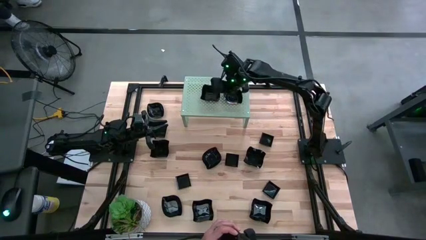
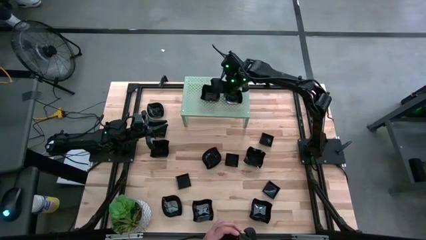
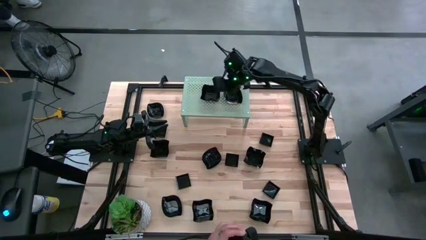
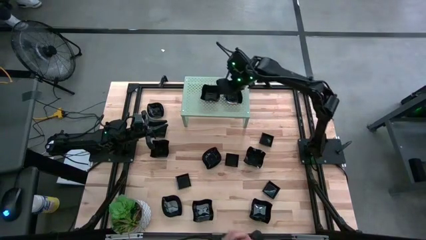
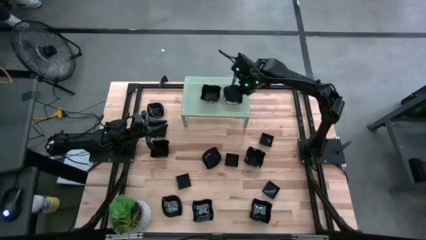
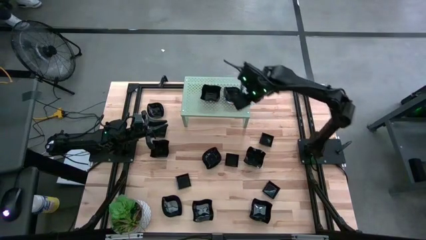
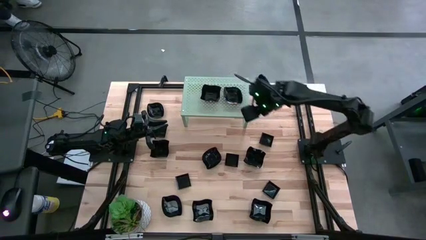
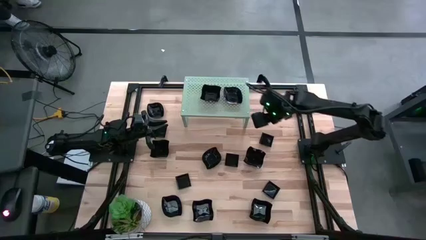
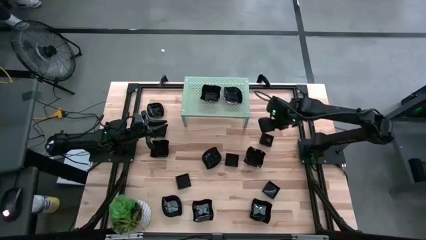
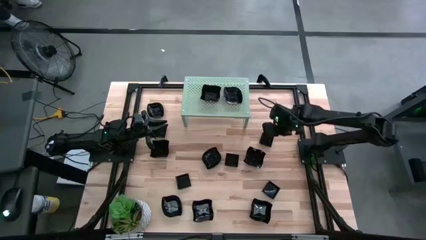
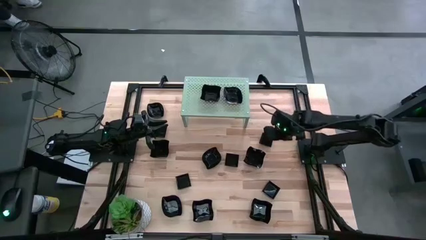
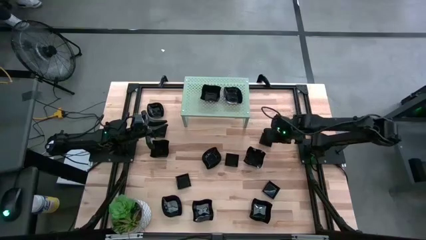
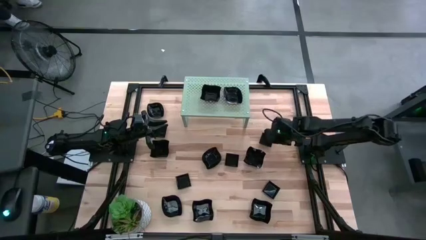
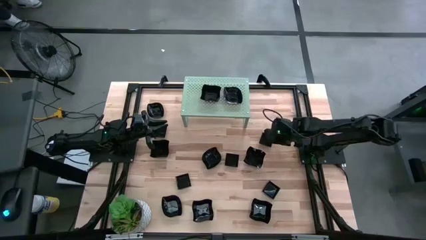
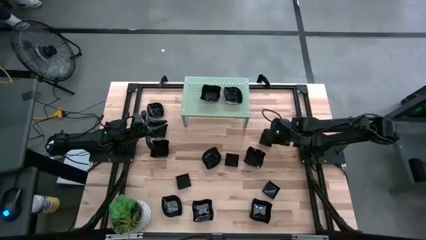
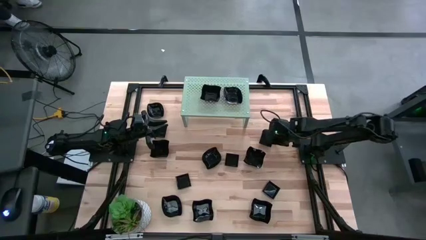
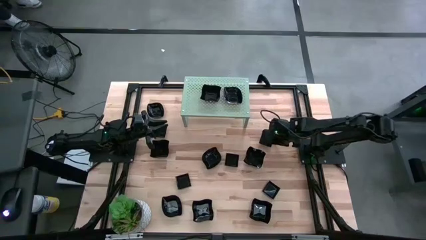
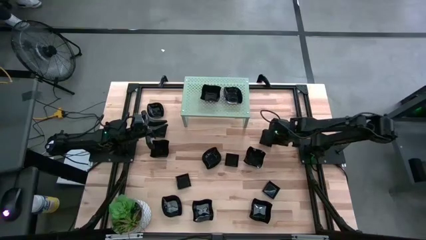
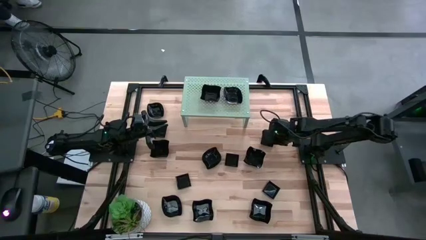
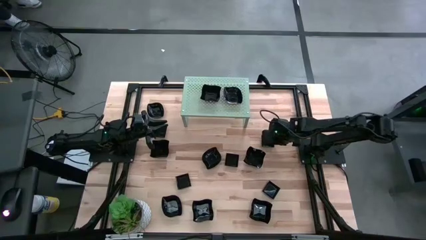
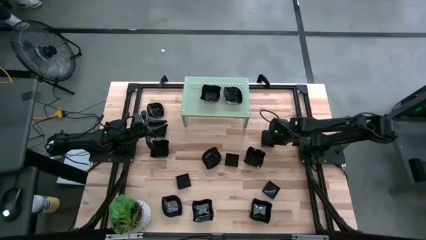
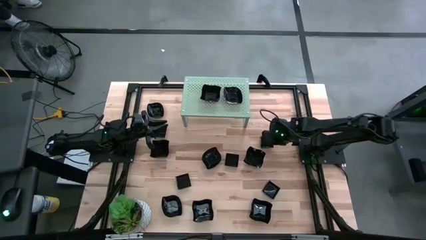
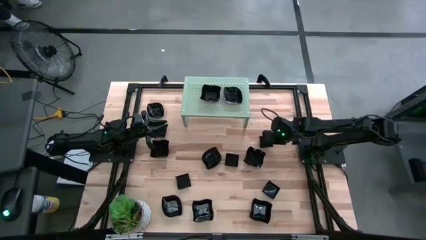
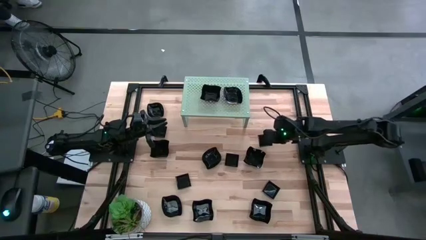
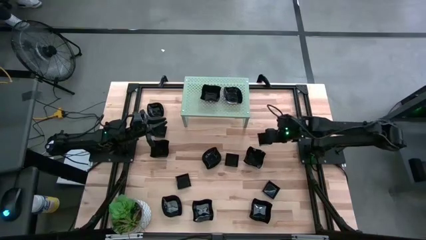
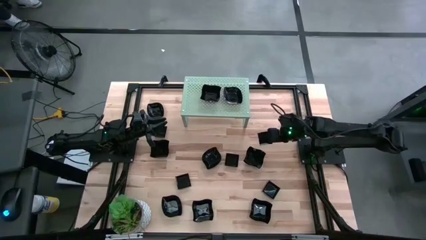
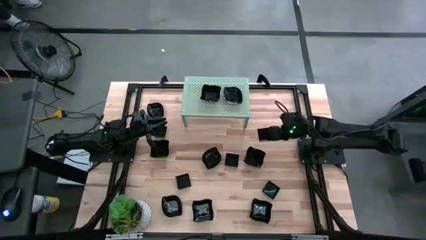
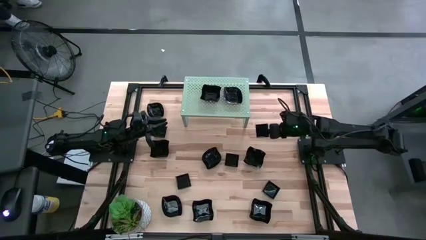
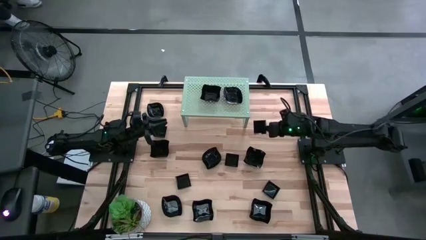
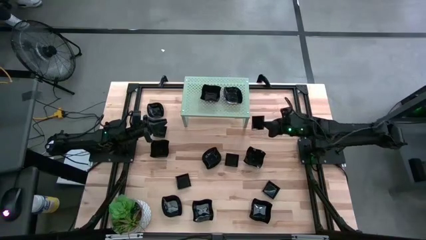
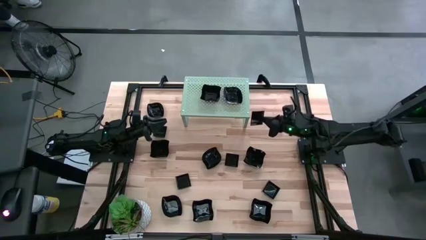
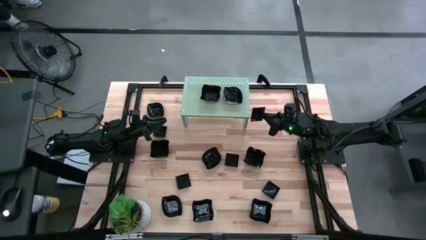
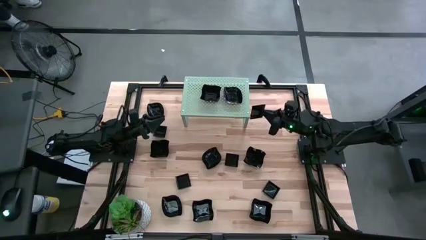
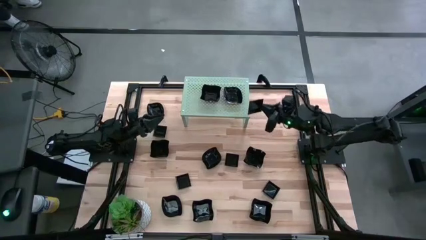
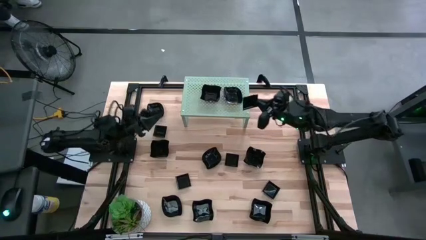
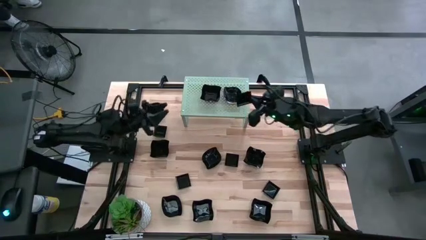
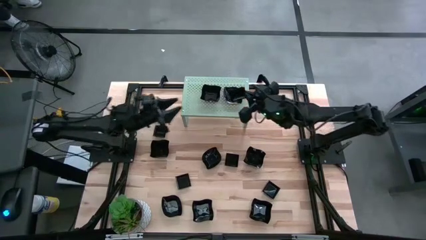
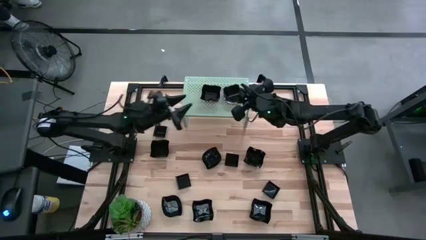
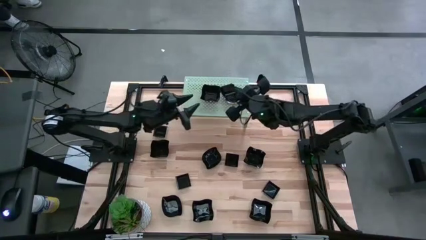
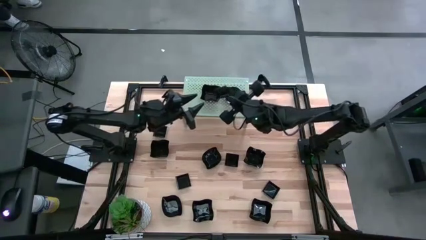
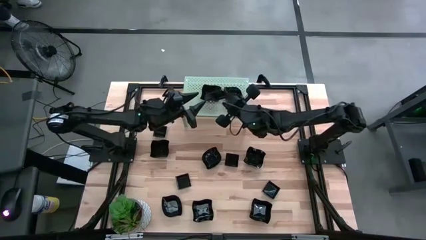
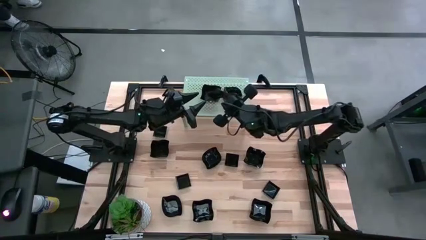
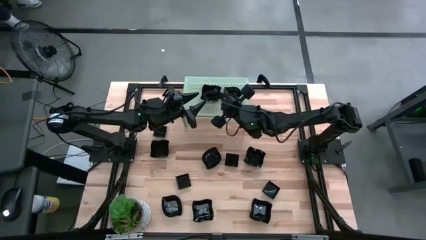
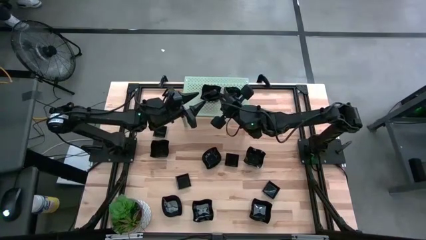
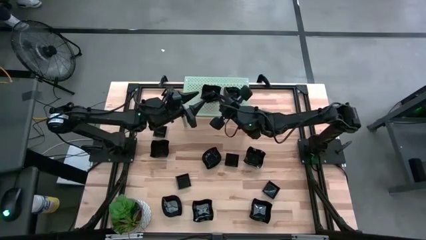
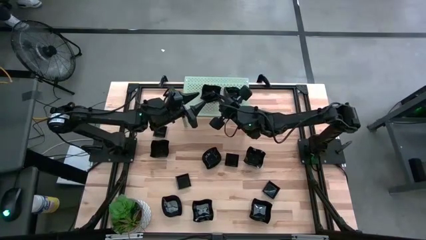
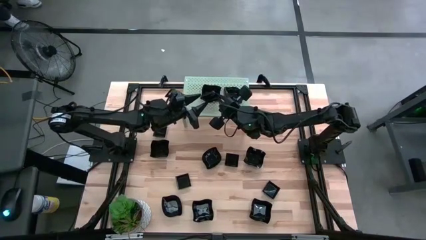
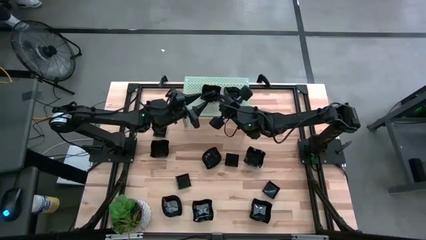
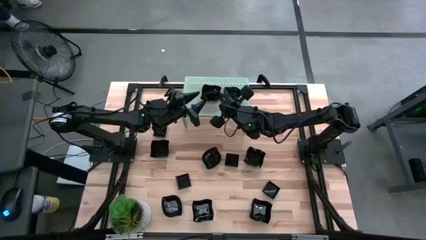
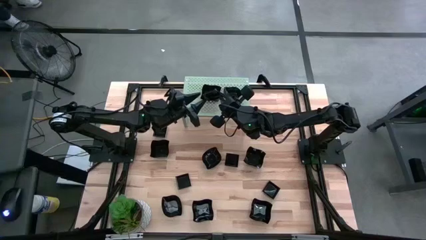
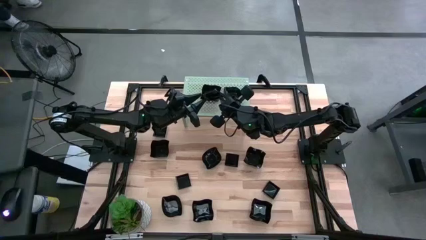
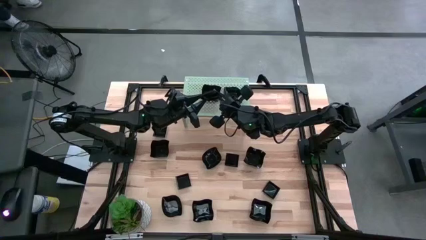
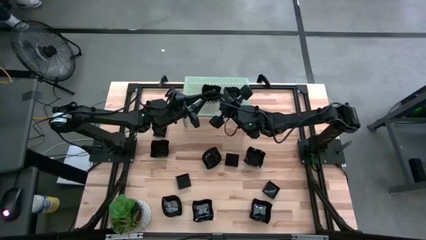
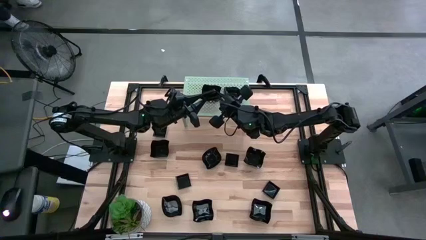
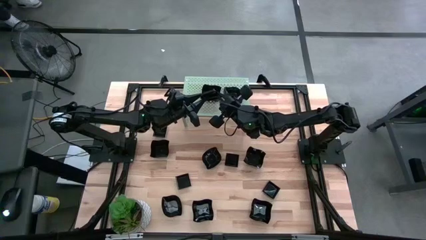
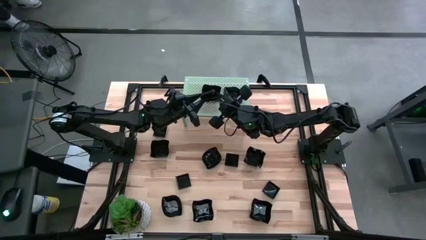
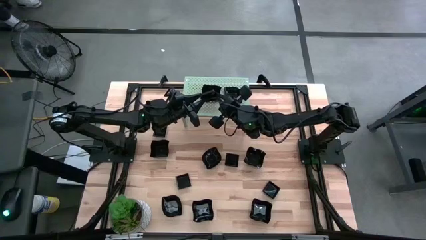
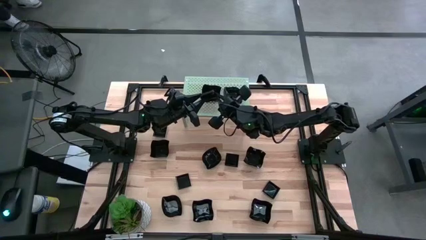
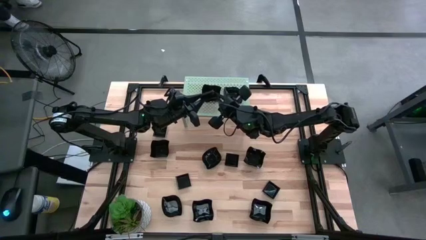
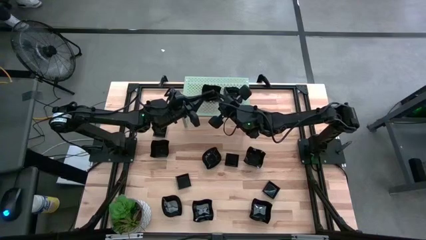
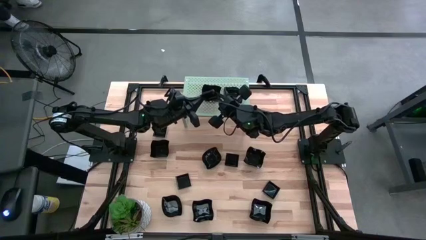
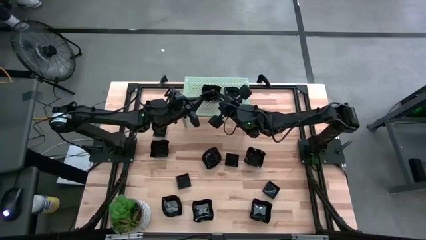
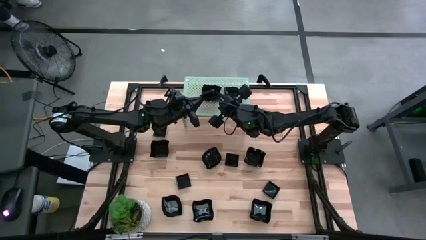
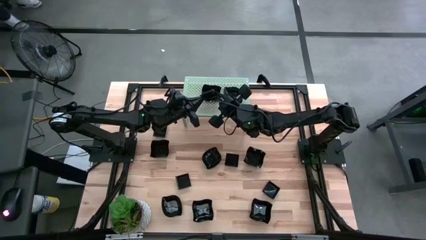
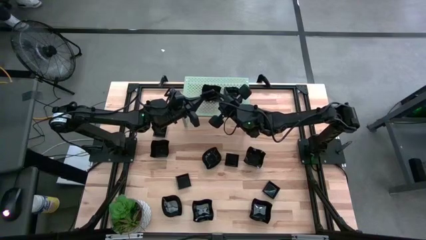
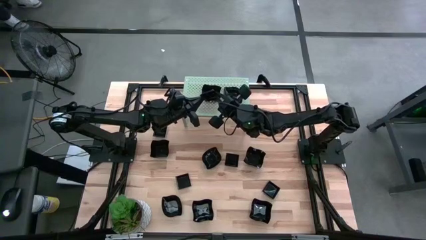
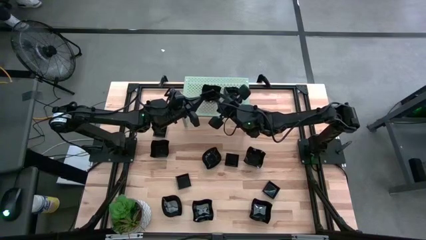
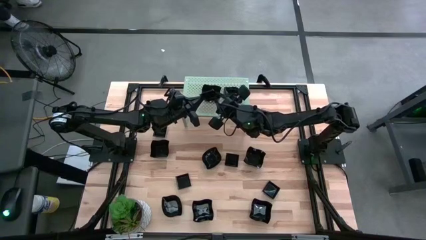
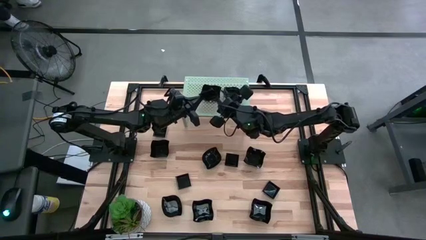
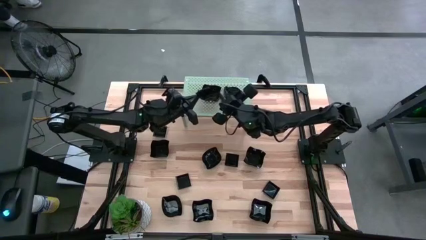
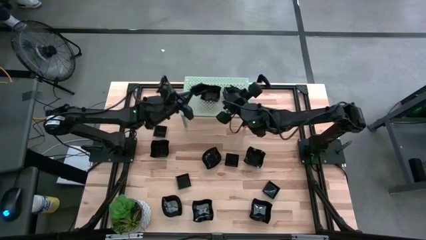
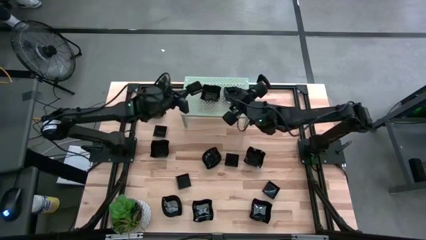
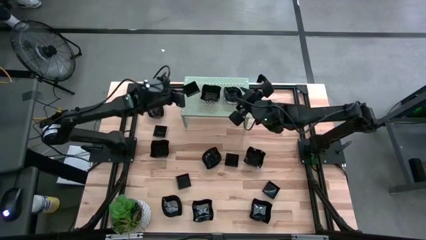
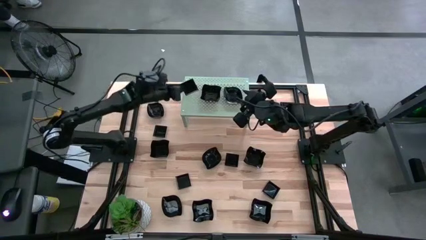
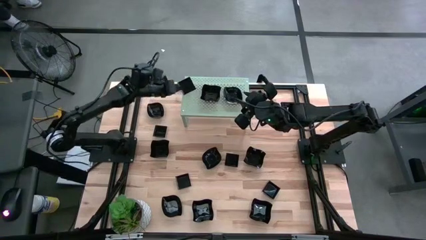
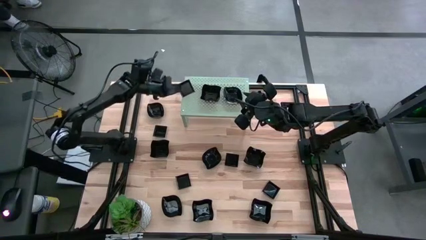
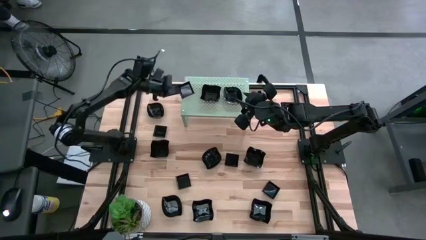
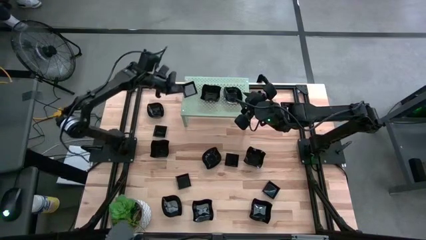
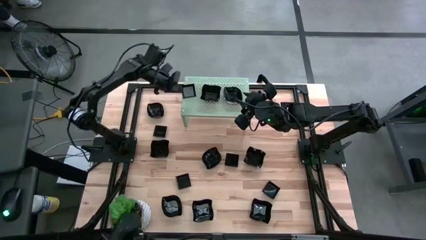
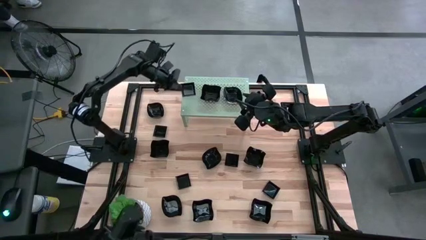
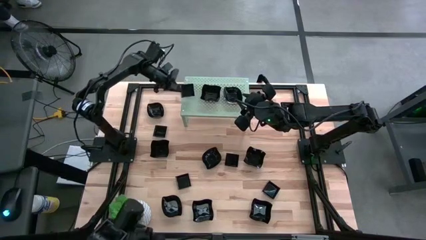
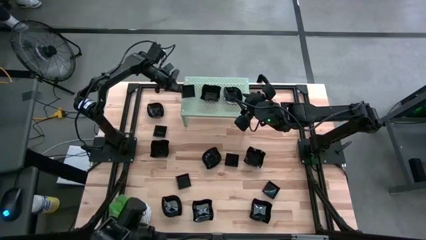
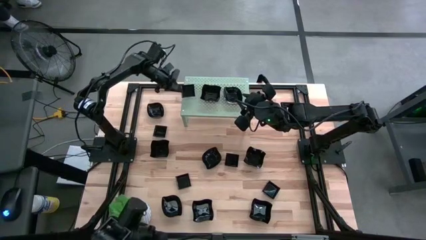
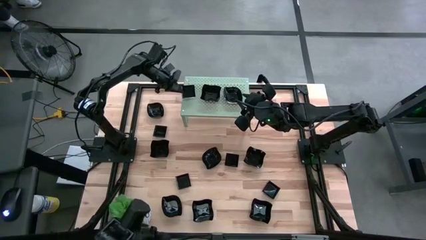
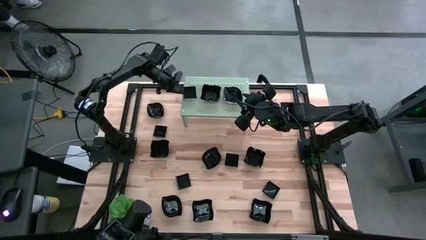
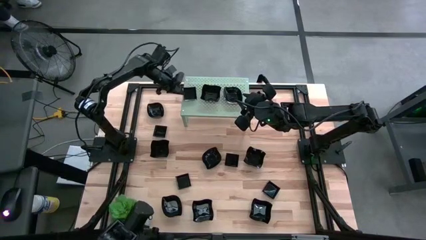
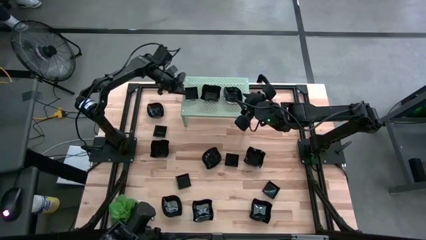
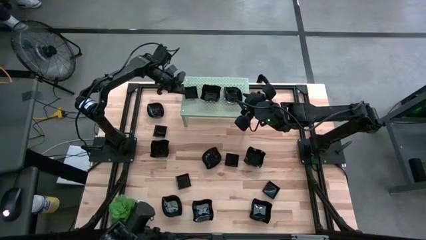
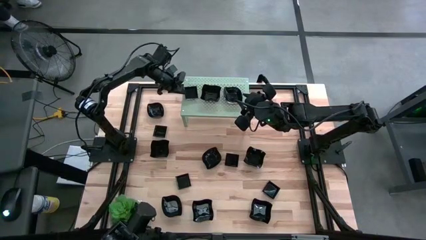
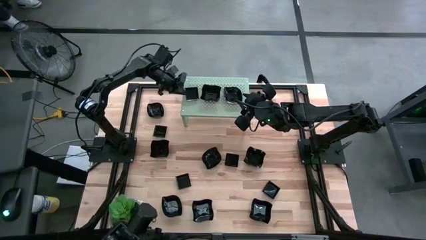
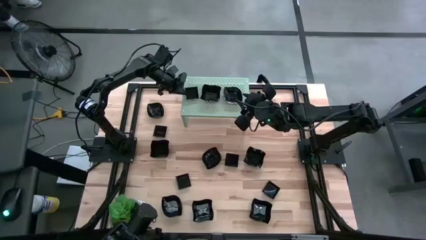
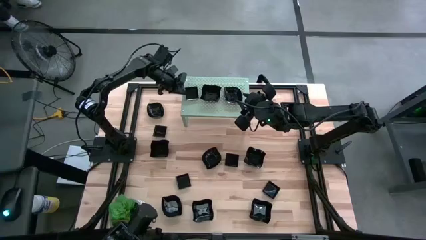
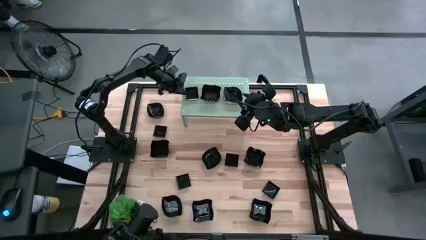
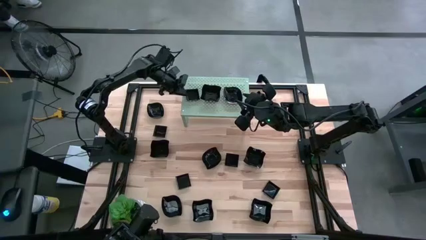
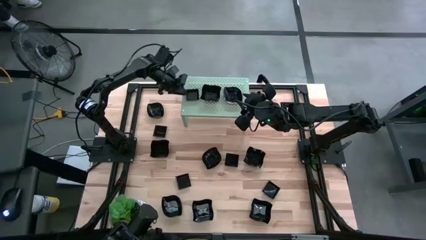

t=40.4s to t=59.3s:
Task: Pick & Place Mini shaped plates
Put the square shaped plate on the shelf
